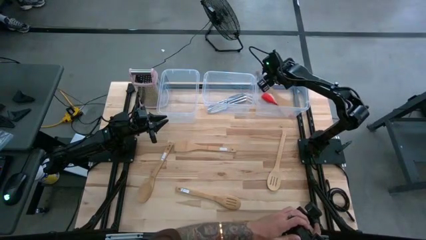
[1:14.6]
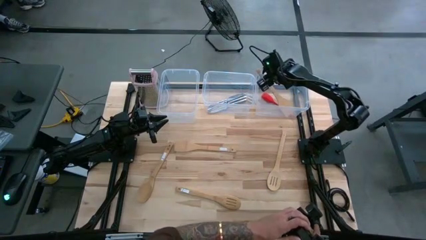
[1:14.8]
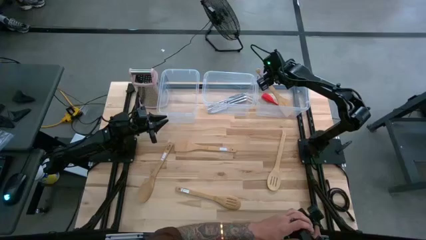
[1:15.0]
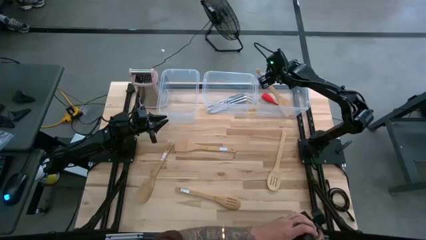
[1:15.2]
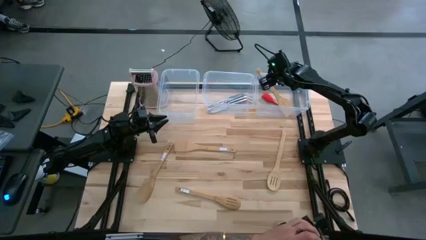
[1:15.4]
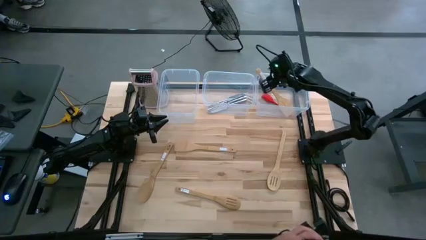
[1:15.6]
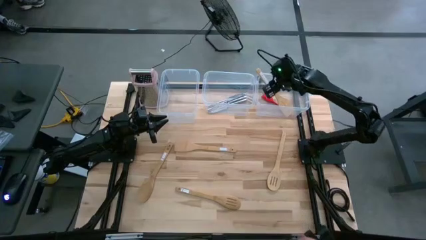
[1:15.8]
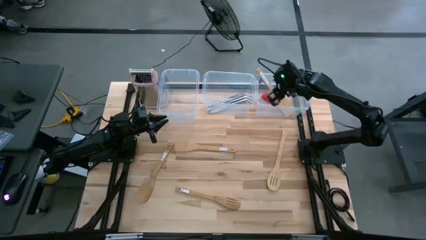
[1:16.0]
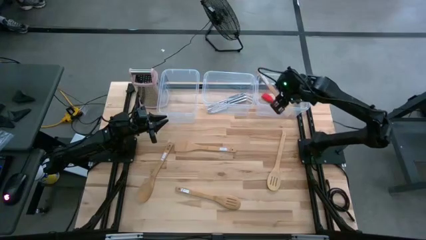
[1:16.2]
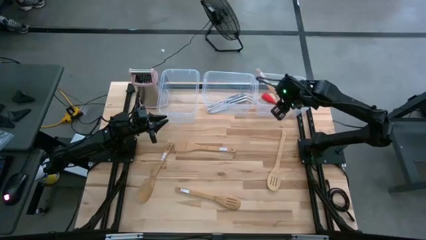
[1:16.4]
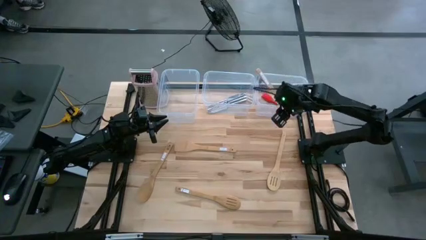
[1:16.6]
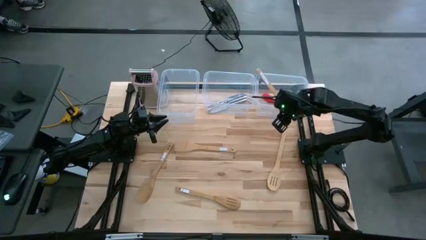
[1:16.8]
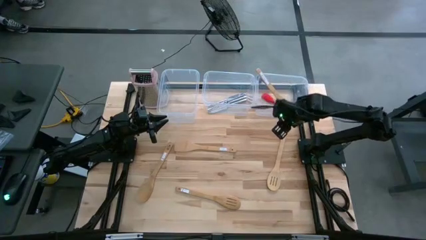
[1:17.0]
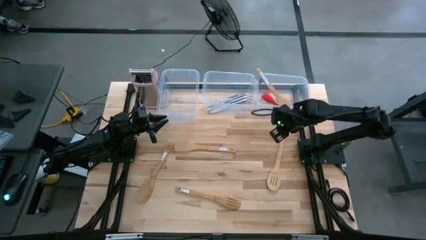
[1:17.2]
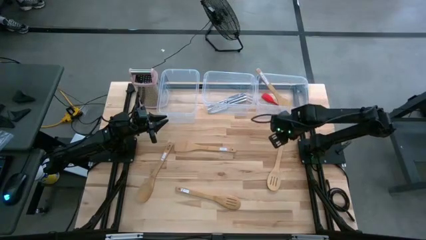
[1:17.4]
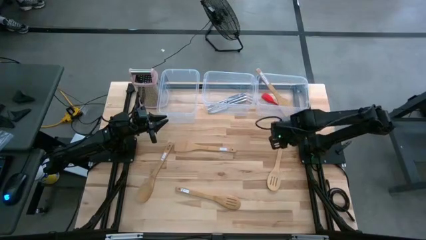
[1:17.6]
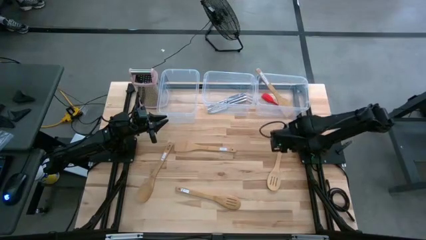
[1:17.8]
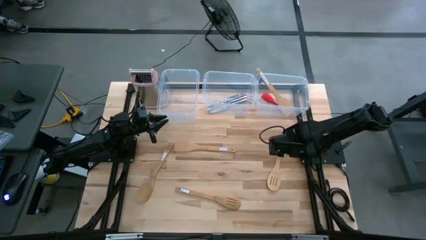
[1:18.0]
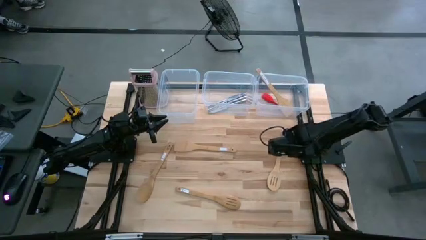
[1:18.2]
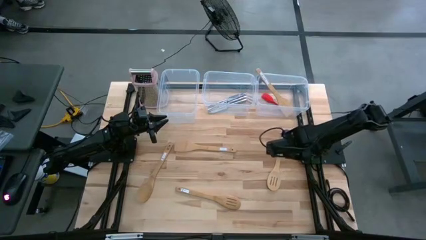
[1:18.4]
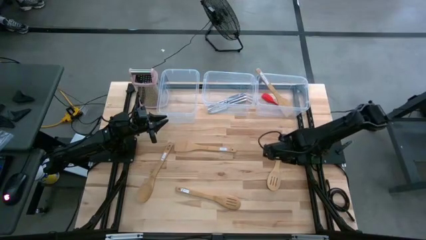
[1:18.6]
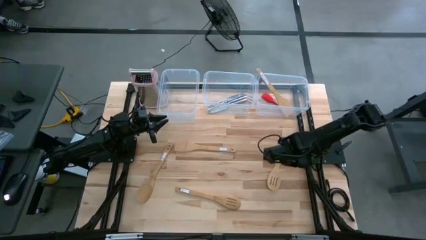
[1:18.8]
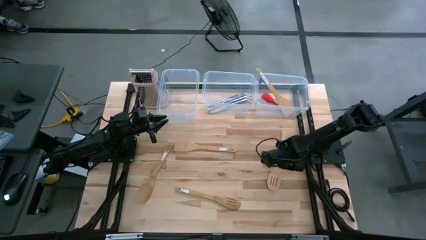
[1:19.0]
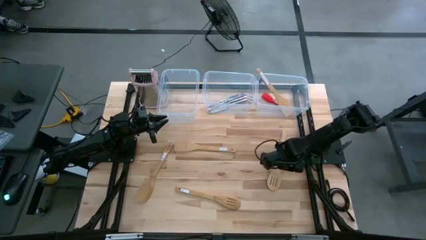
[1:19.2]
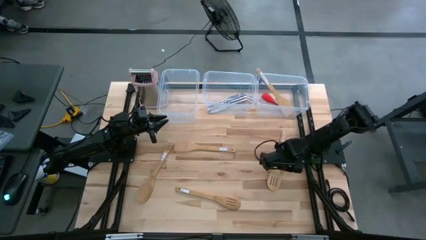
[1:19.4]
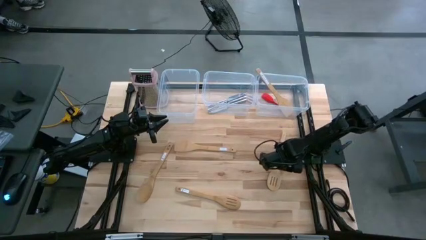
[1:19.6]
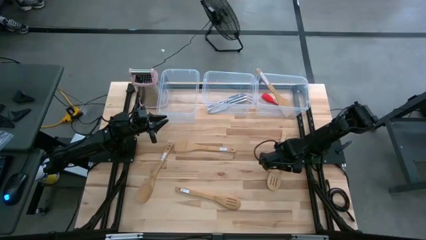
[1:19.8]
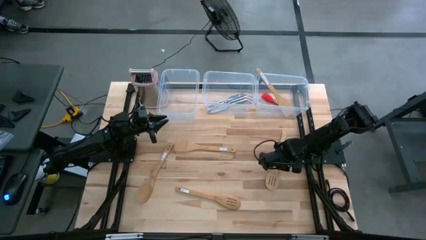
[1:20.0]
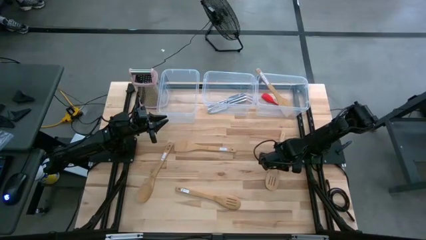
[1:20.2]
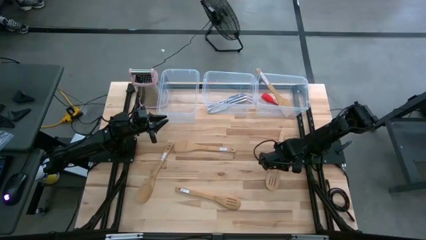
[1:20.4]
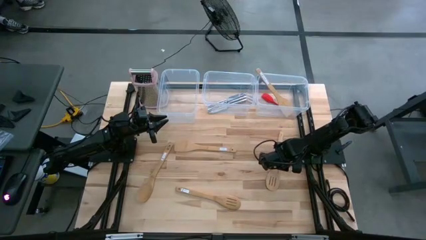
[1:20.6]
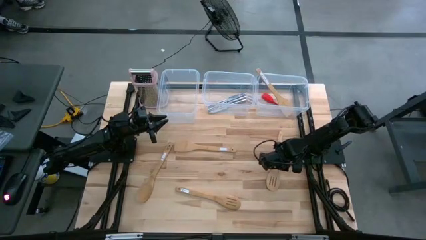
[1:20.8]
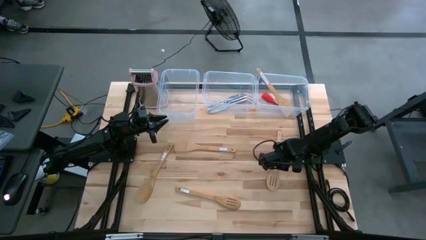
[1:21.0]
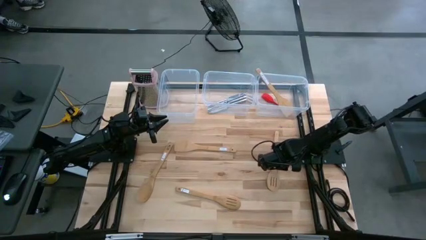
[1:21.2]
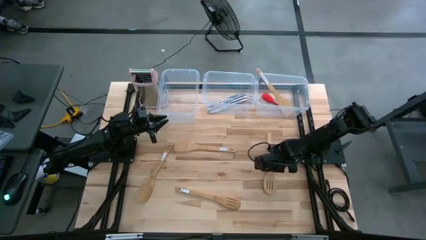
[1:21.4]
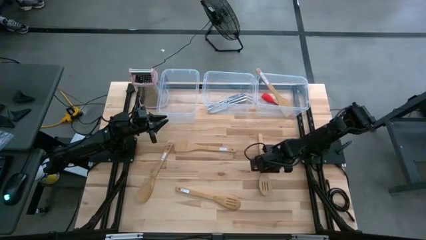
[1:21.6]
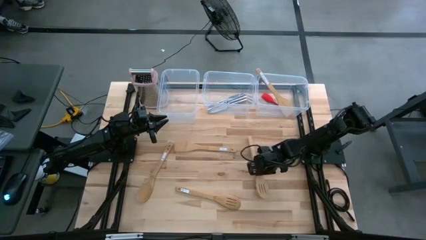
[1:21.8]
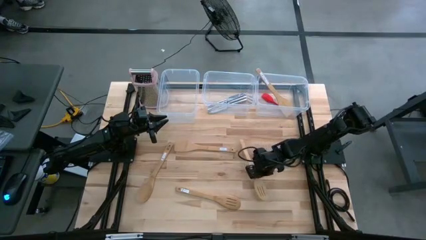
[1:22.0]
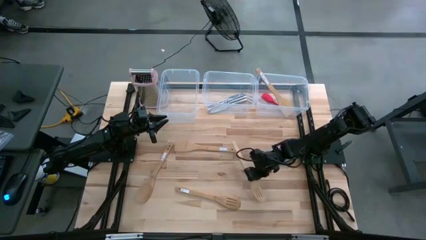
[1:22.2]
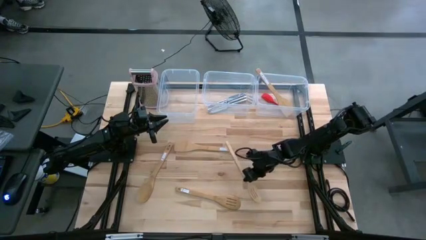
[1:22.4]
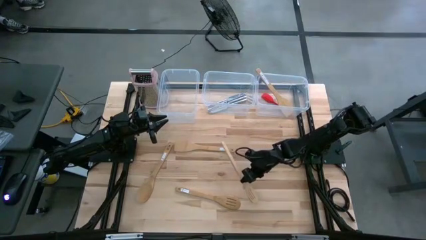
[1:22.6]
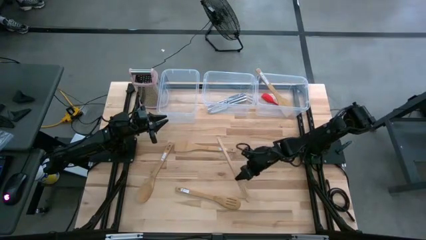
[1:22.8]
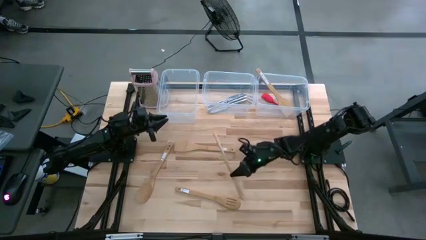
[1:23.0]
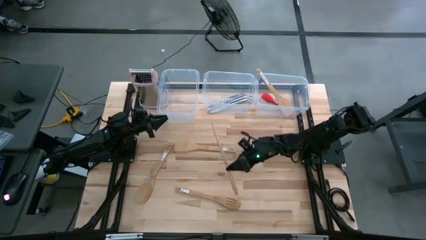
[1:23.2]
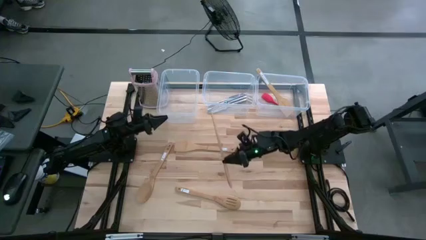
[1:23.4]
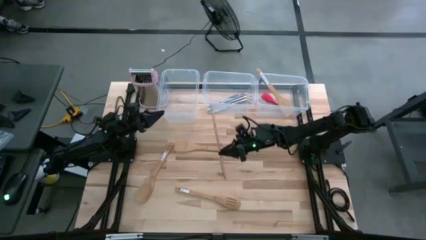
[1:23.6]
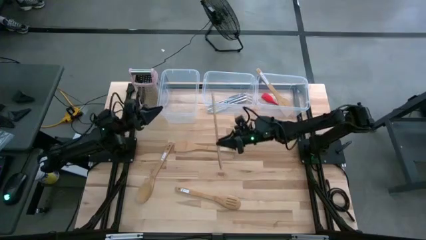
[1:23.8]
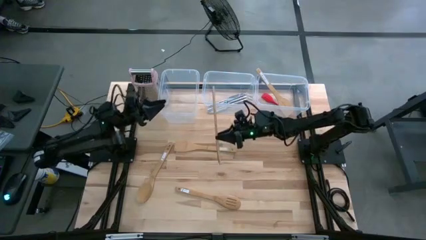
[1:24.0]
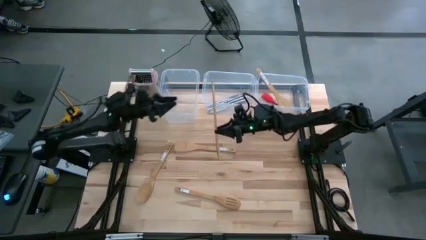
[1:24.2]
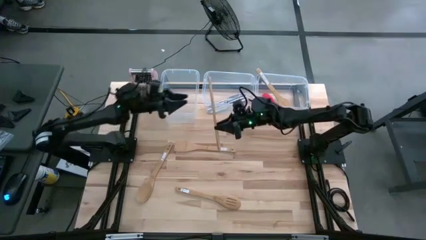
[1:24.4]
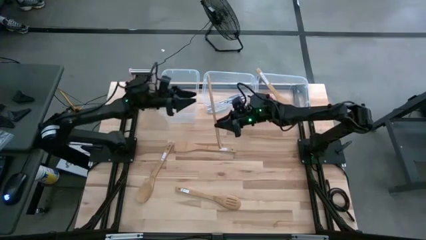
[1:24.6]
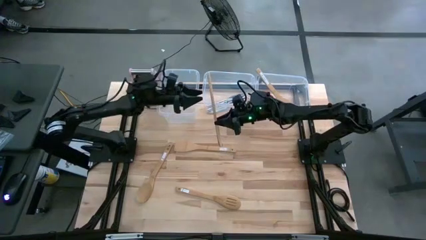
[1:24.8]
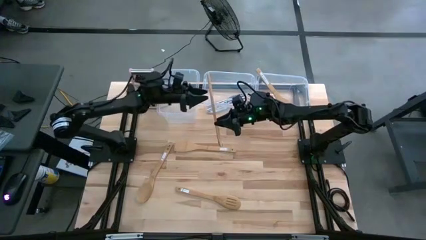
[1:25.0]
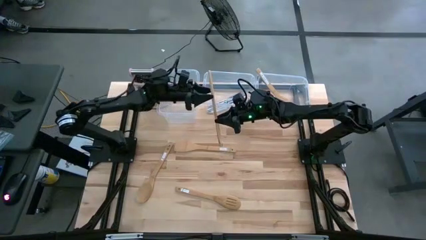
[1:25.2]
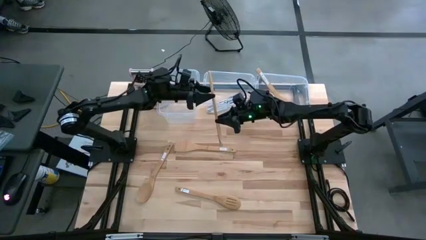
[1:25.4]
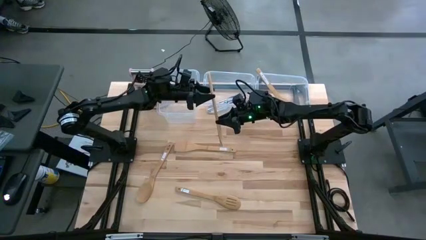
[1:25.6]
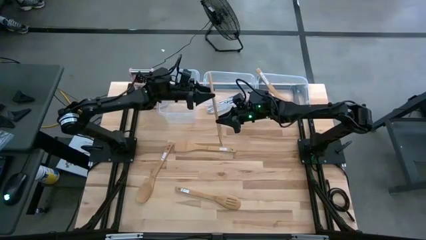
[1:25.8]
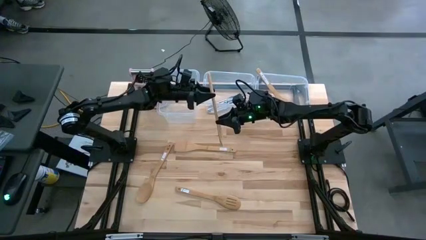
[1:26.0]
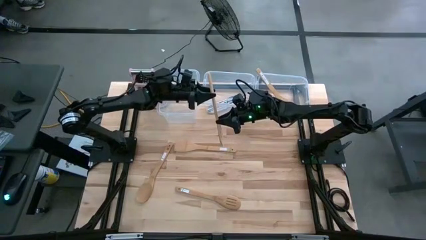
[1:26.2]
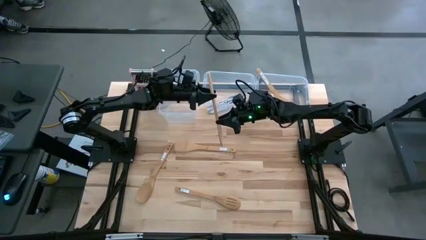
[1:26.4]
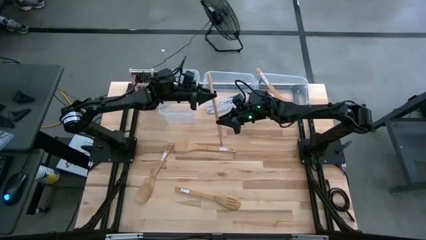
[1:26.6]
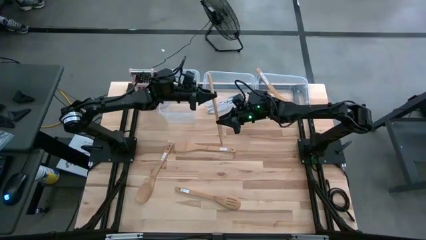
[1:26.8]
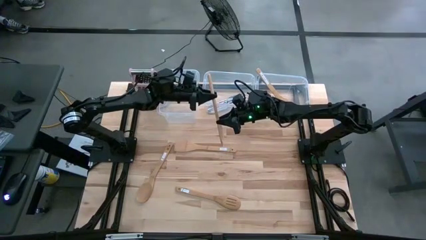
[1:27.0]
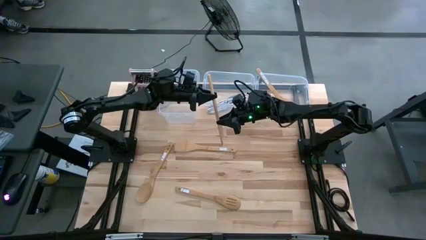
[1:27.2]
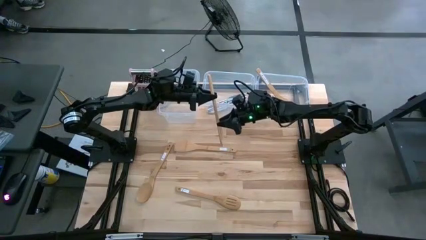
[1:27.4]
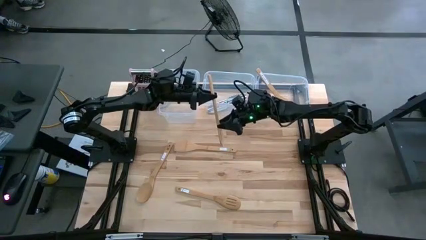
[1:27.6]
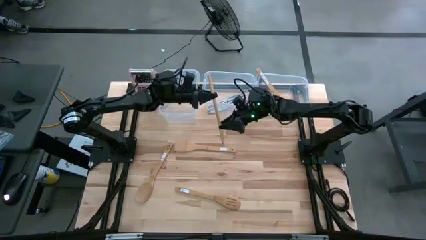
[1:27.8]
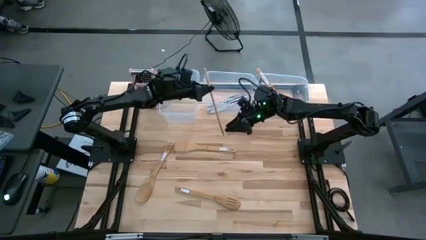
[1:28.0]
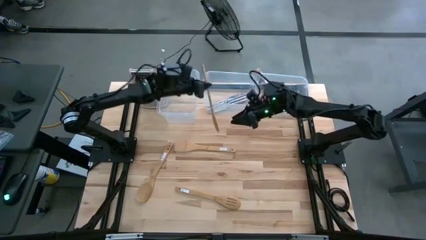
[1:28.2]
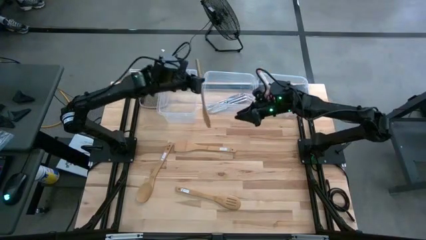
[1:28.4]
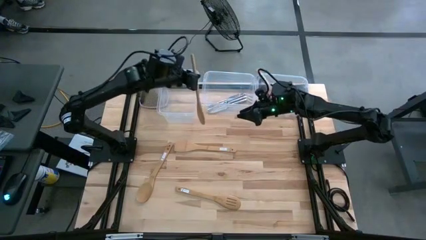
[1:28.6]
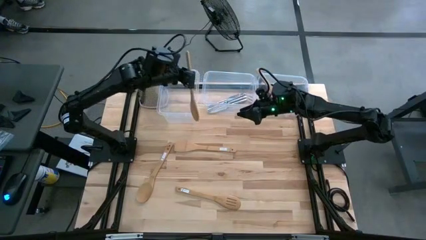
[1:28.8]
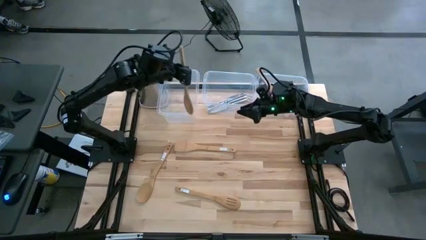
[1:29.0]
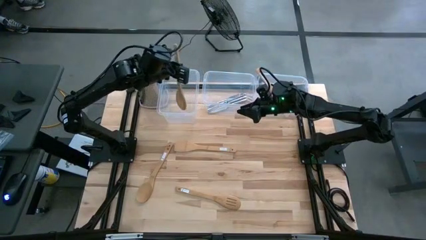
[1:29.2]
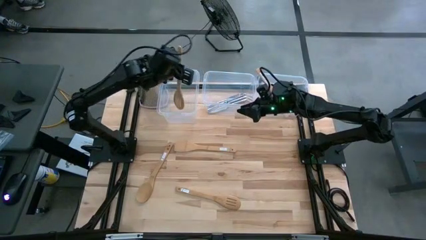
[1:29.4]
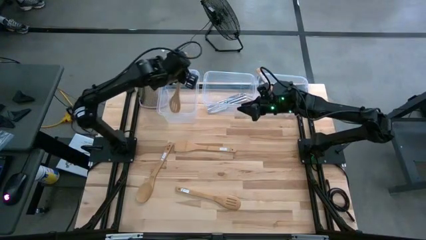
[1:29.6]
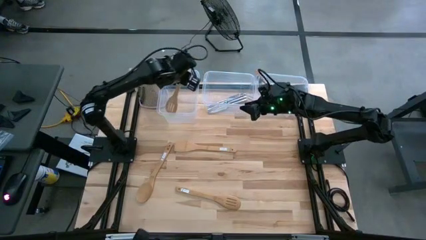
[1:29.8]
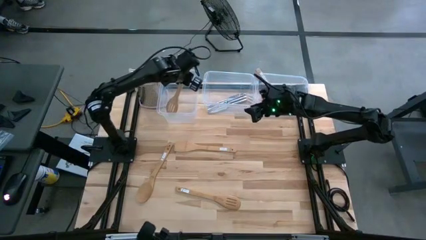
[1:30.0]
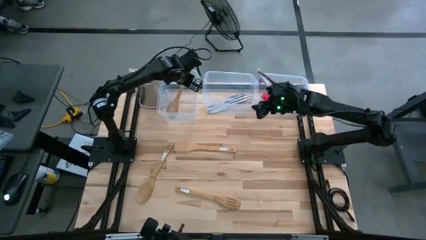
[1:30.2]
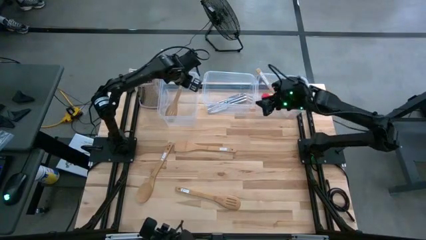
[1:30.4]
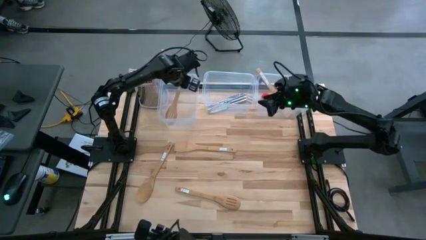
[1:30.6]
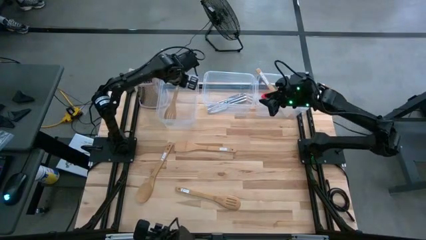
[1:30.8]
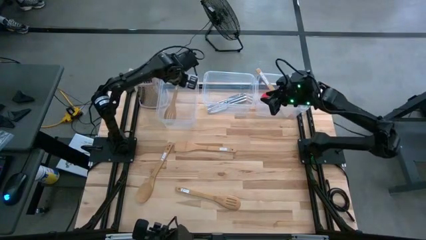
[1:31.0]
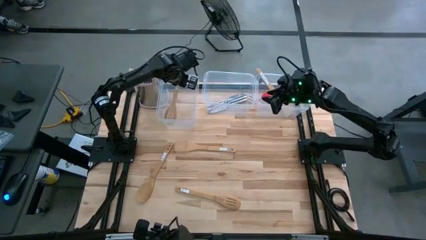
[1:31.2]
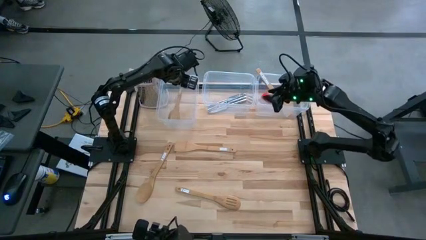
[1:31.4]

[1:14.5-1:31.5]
Task: Pick & Place Kitchen Items
Put the brown slotted serving spoon into the left transparent container
